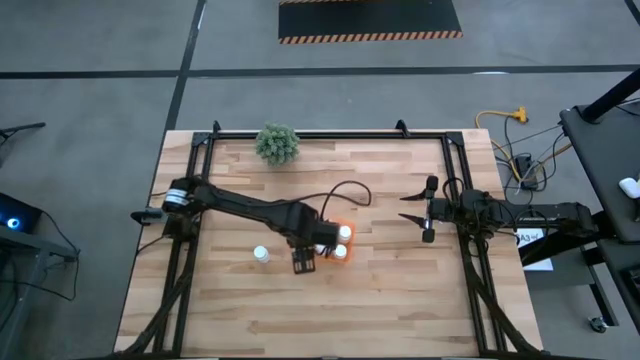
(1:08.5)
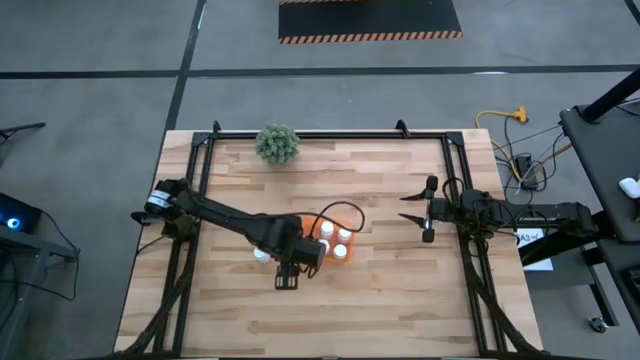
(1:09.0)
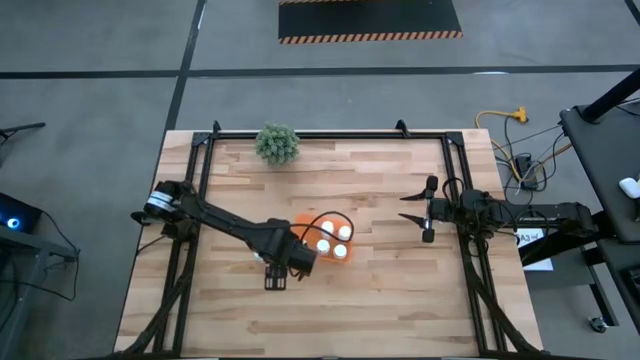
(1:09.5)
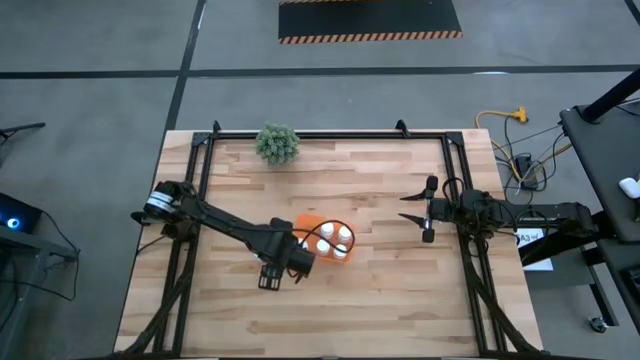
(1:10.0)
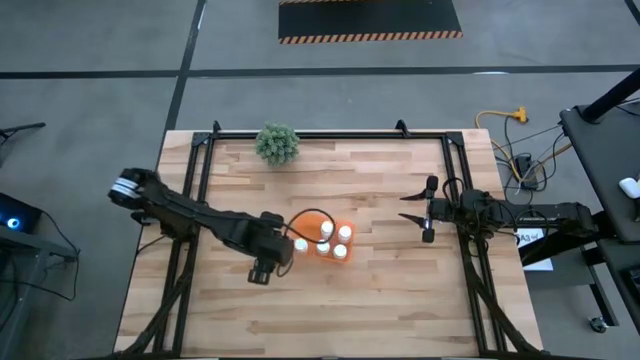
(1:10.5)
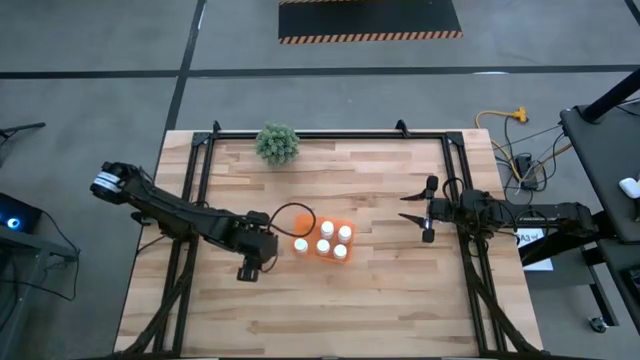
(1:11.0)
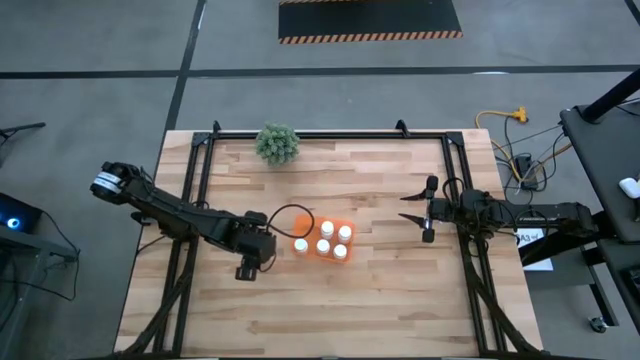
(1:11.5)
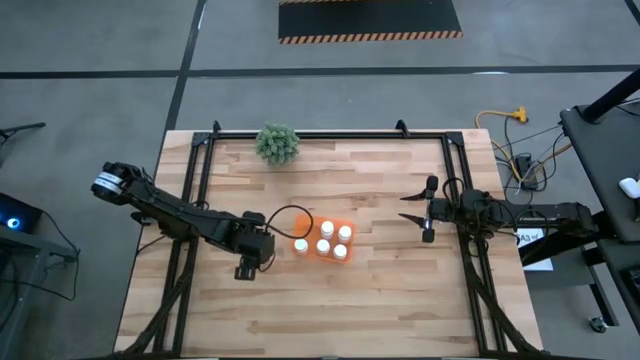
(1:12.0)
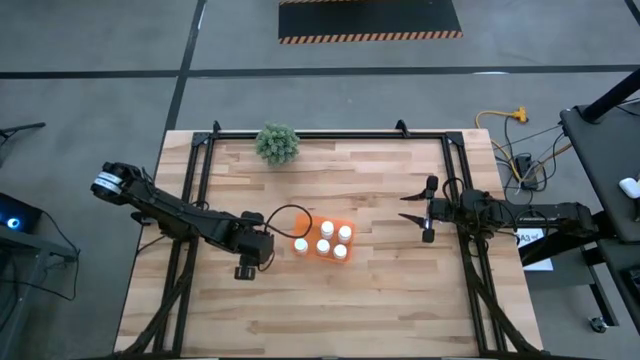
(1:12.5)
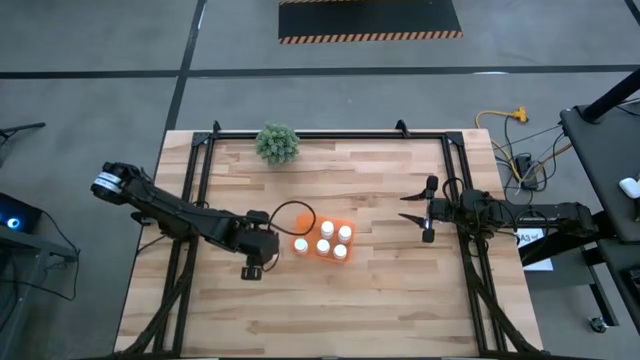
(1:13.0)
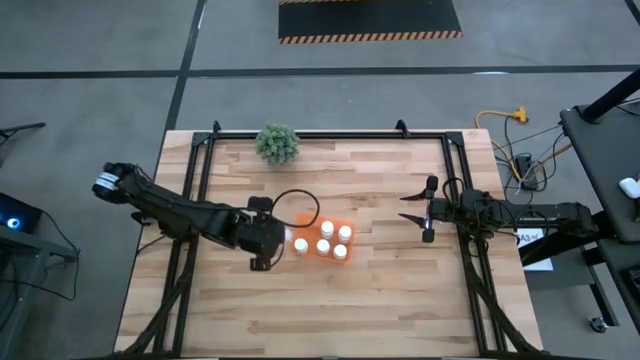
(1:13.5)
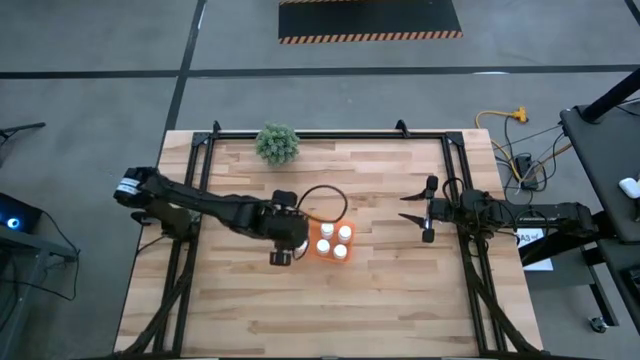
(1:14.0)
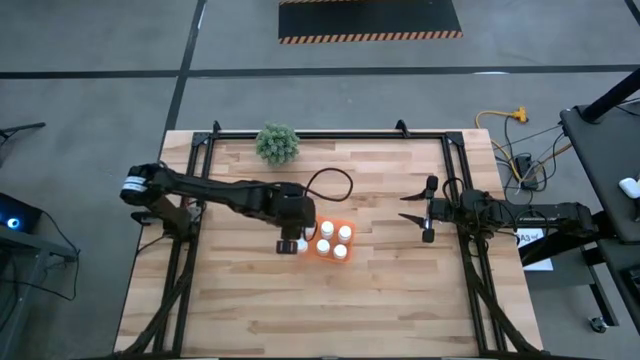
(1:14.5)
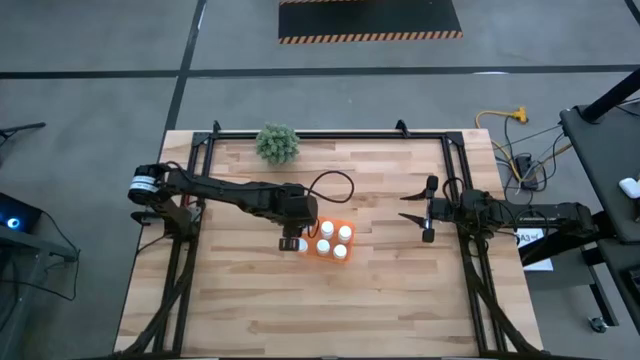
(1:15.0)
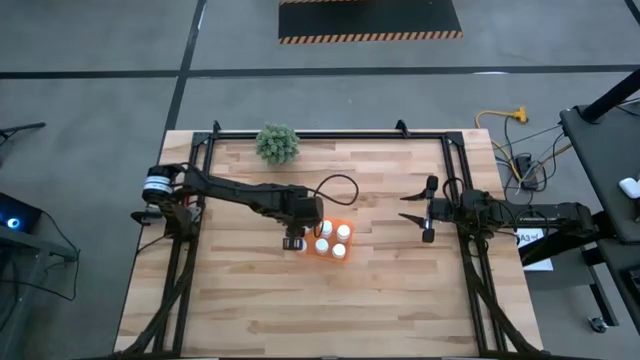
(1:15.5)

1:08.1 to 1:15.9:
Task: Pick and place pill bottles into a basket
Put the pill bottle into the bin

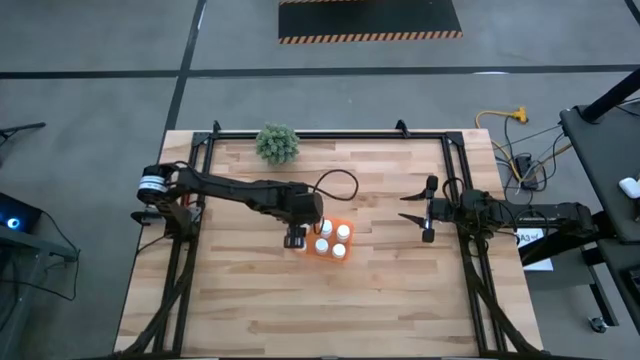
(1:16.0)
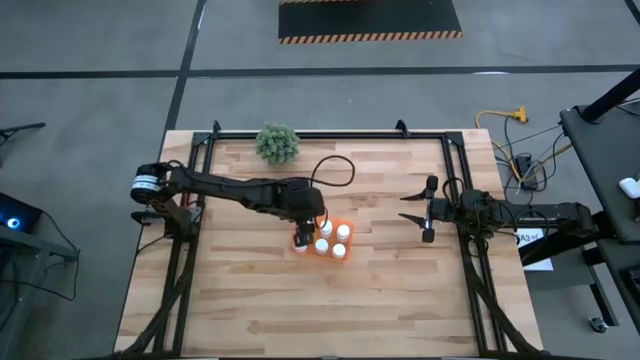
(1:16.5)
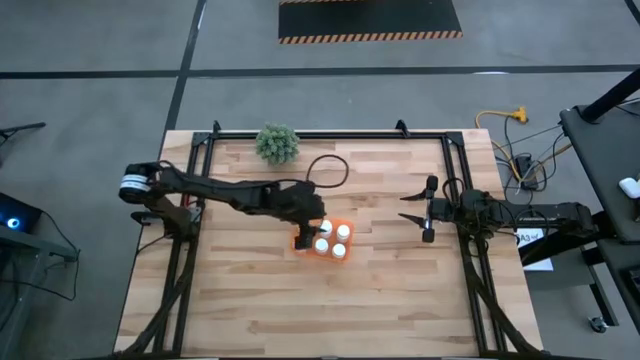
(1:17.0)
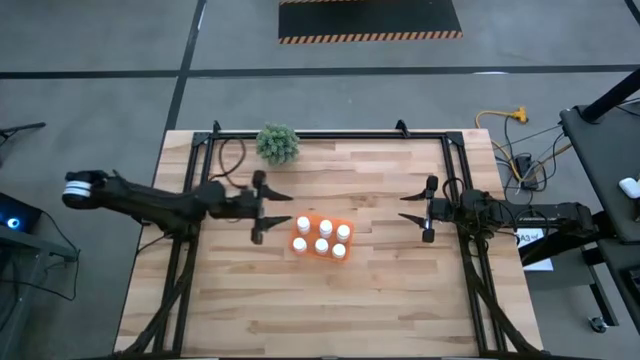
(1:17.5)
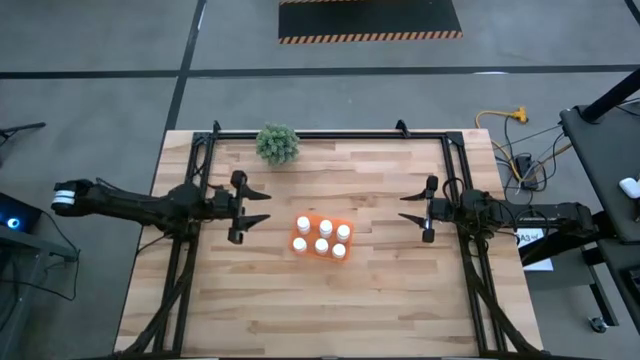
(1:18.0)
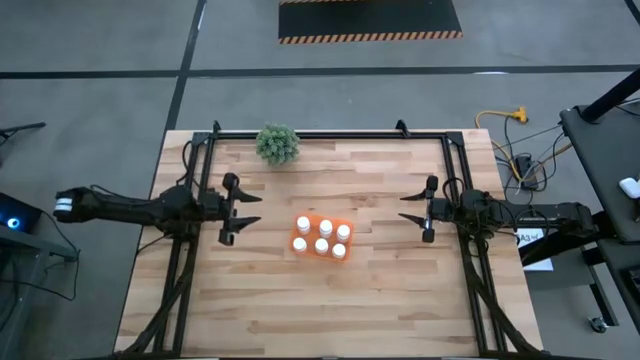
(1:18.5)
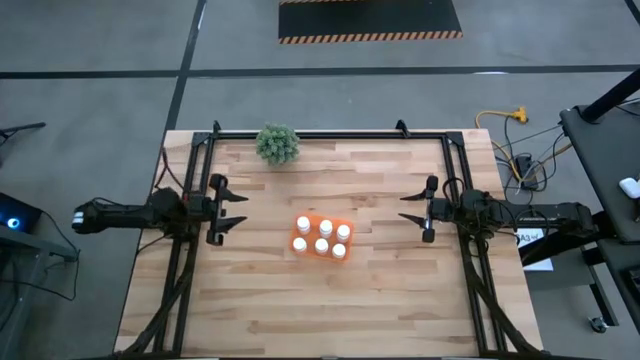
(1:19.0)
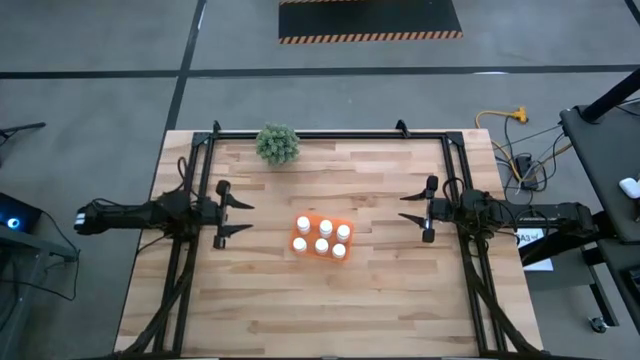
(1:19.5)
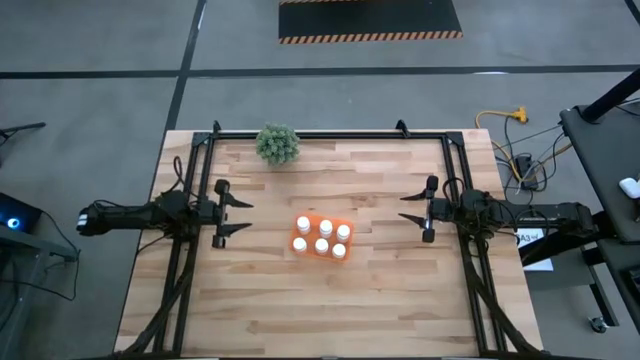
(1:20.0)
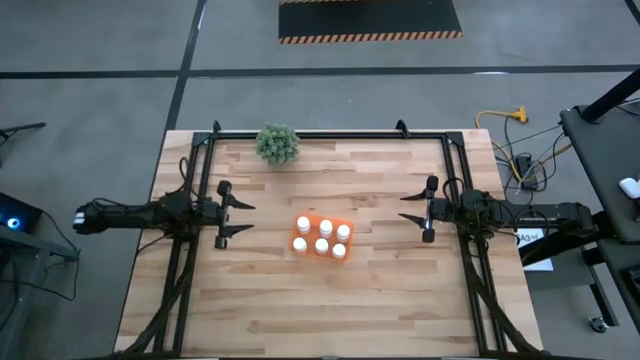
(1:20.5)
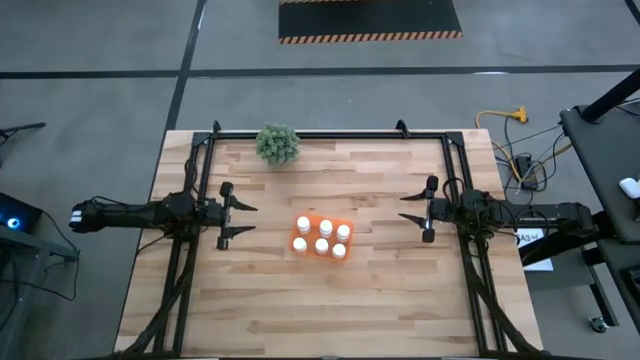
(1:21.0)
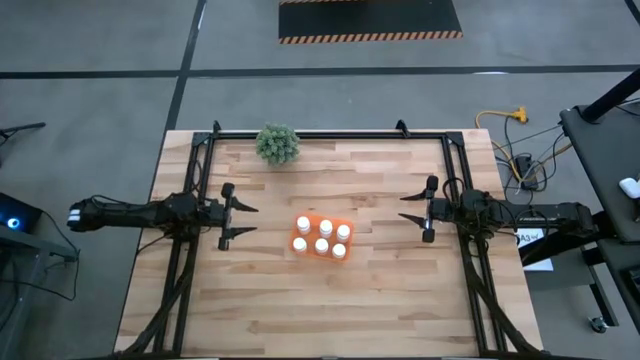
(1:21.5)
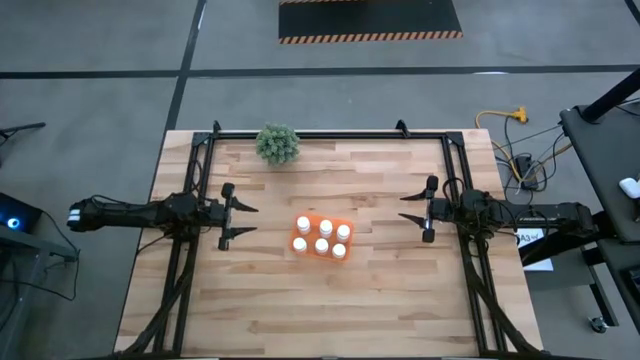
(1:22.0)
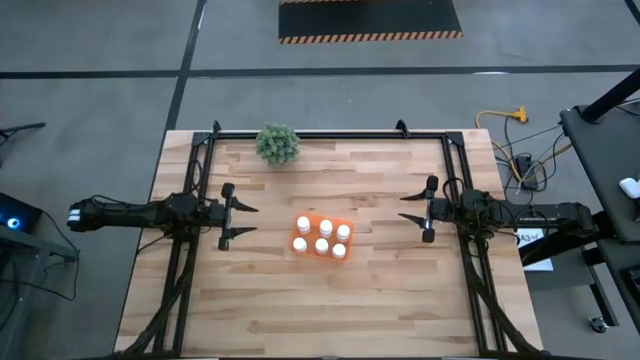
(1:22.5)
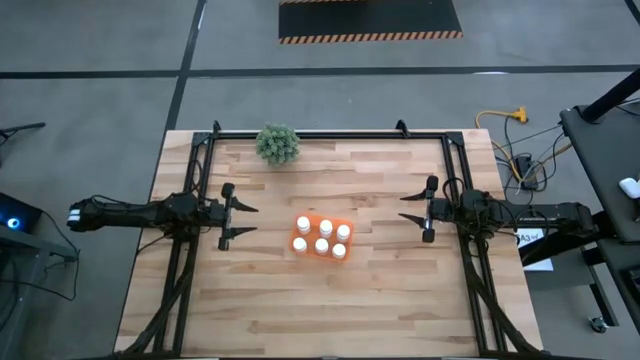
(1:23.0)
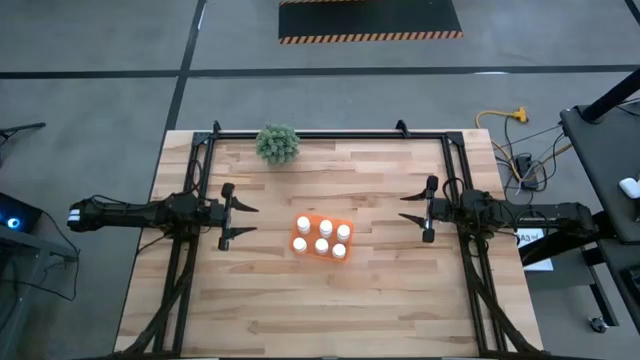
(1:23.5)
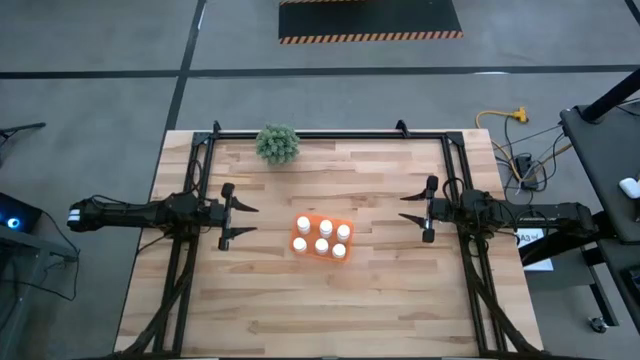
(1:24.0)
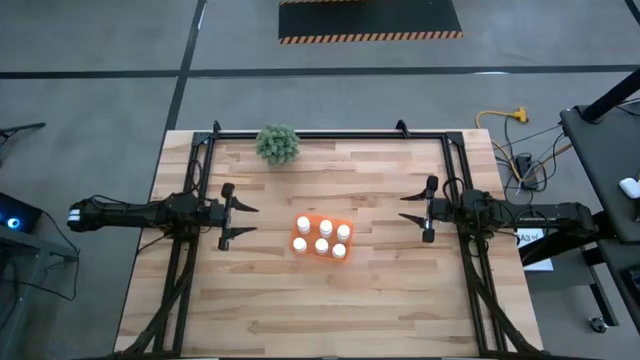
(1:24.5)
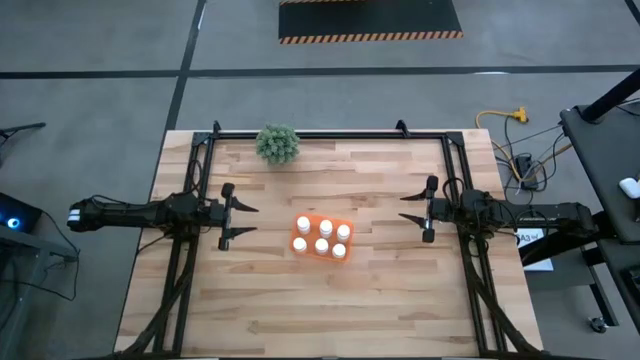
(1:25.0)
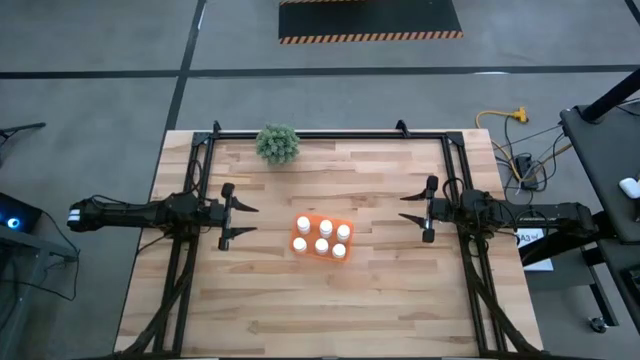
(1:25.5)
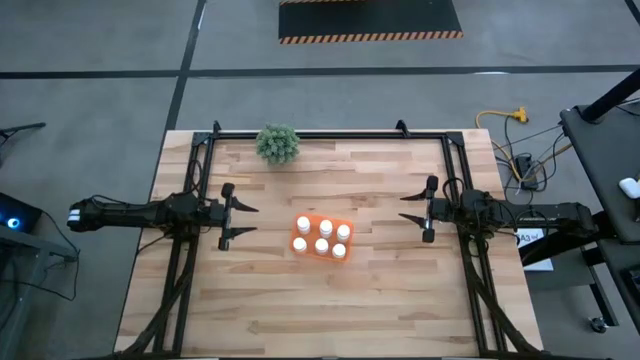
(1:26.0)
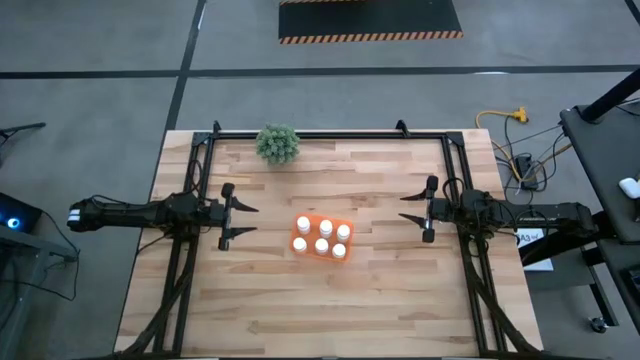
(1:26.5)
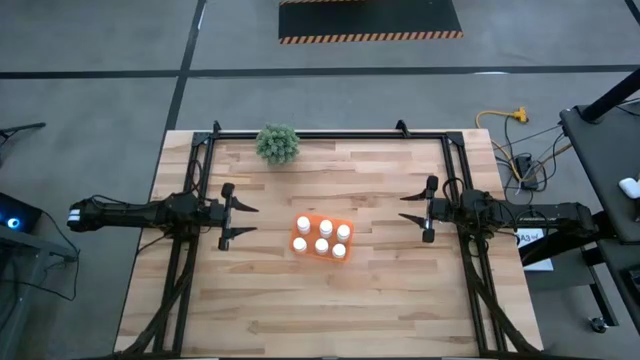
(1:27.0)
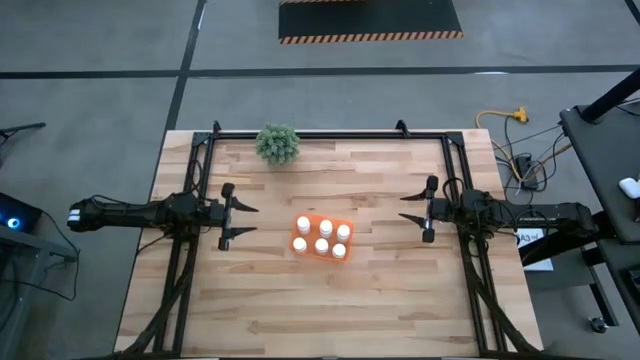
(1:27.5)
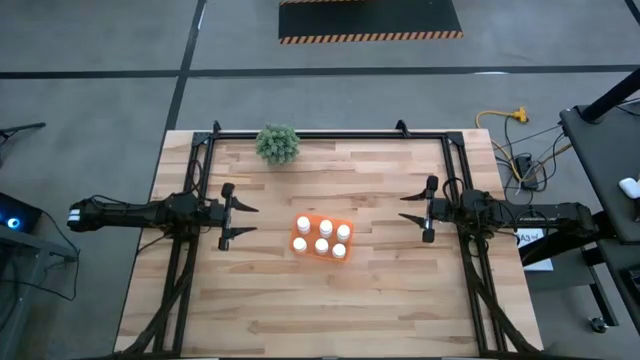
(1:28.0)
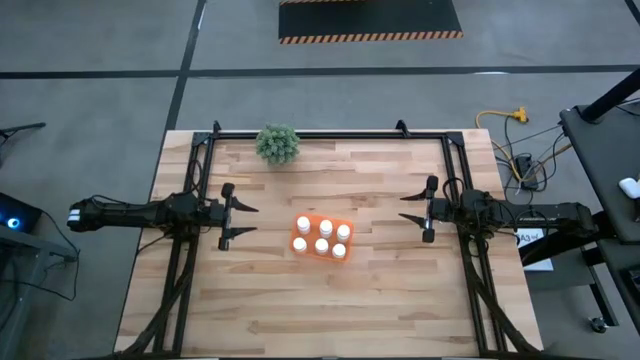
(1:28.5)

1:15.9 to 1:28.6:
Return to Home Position
